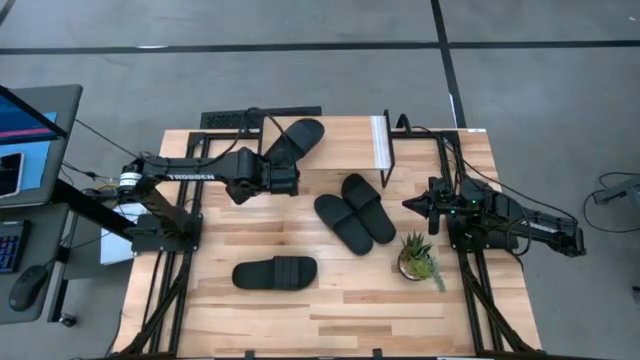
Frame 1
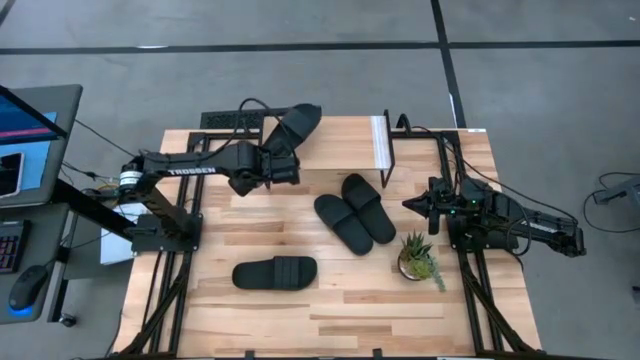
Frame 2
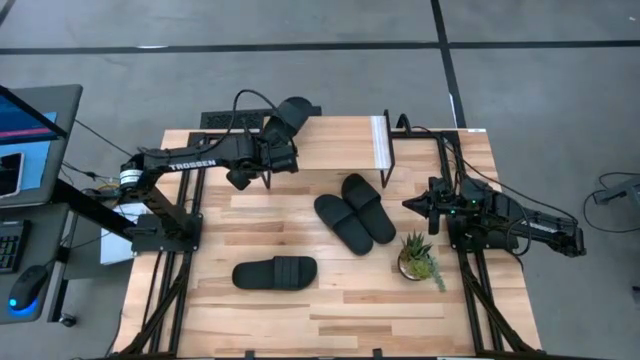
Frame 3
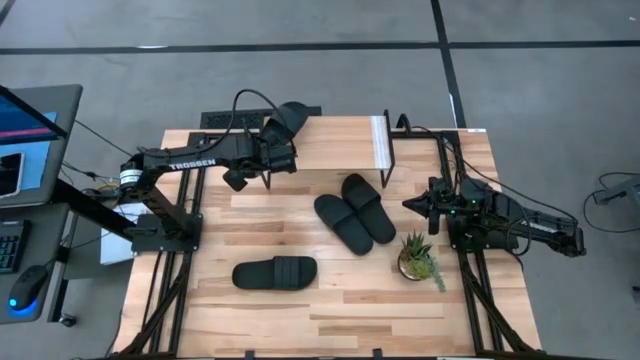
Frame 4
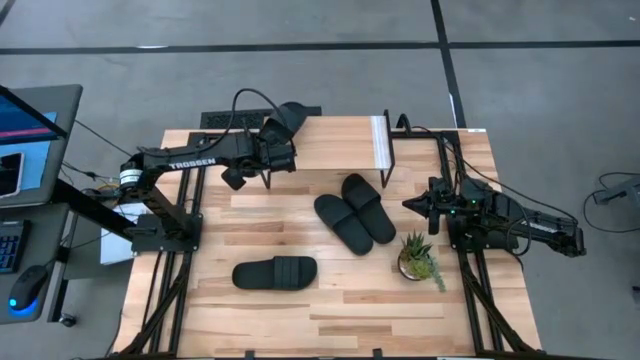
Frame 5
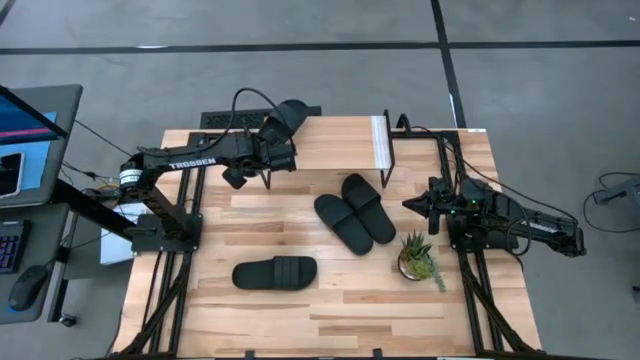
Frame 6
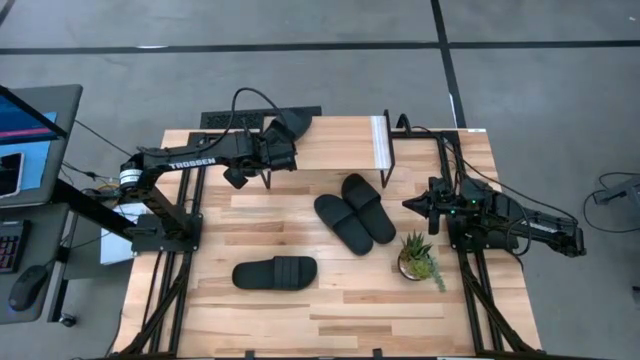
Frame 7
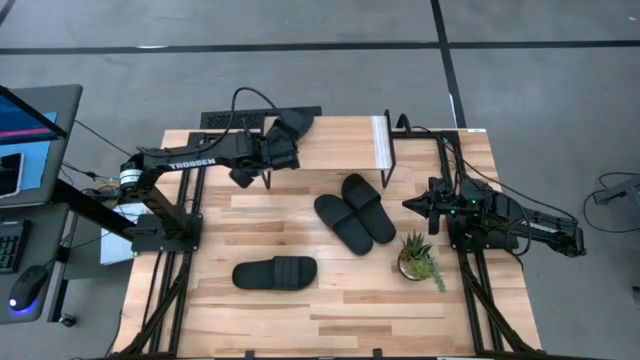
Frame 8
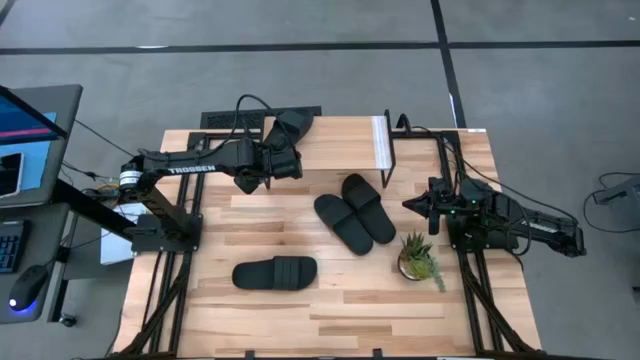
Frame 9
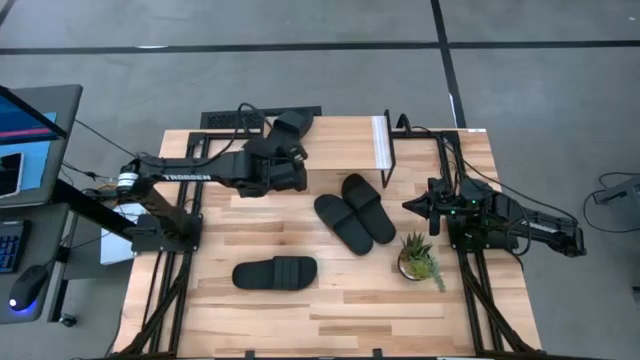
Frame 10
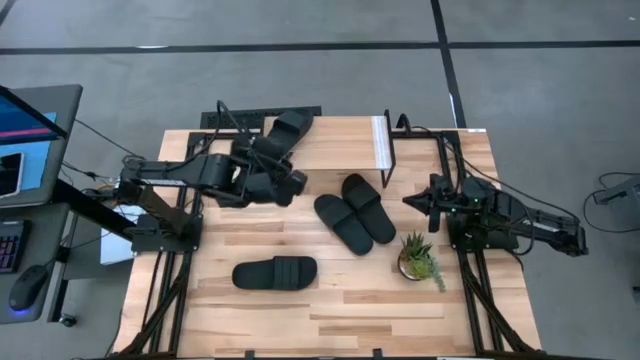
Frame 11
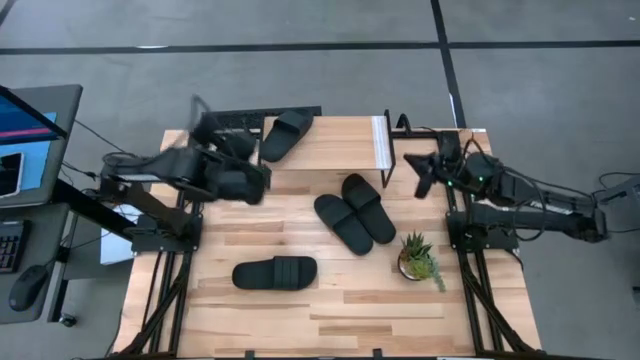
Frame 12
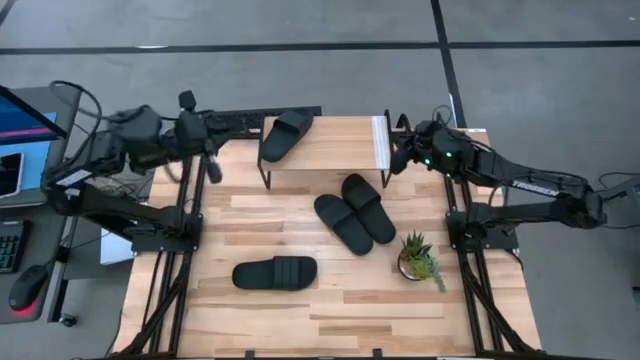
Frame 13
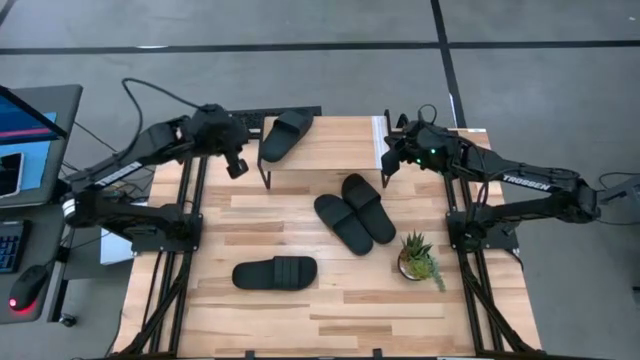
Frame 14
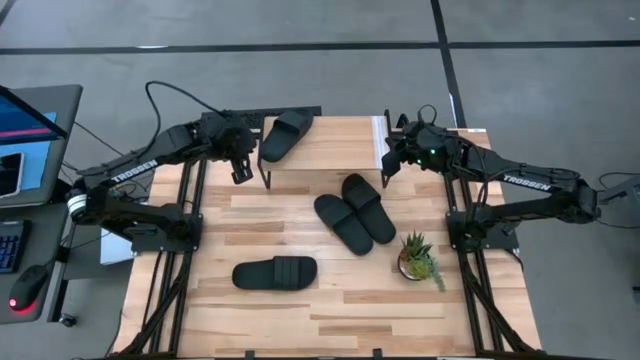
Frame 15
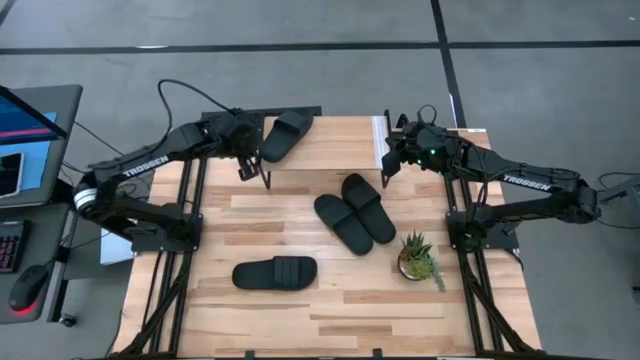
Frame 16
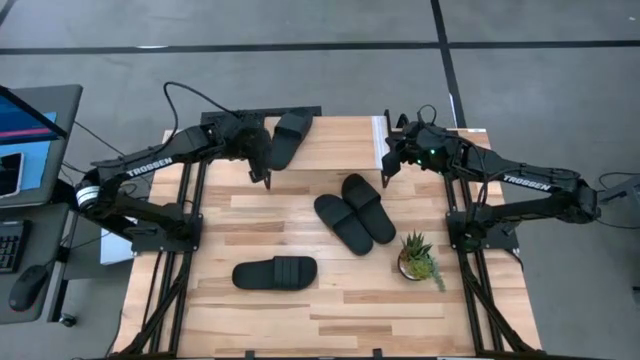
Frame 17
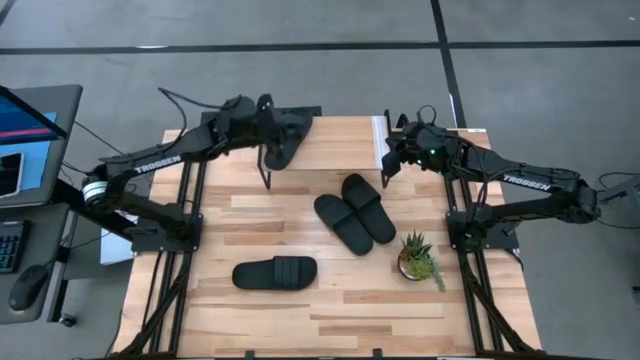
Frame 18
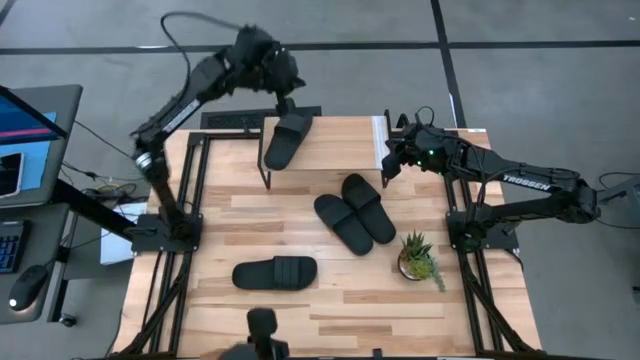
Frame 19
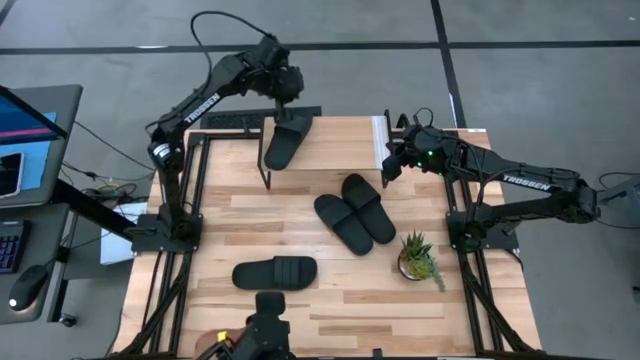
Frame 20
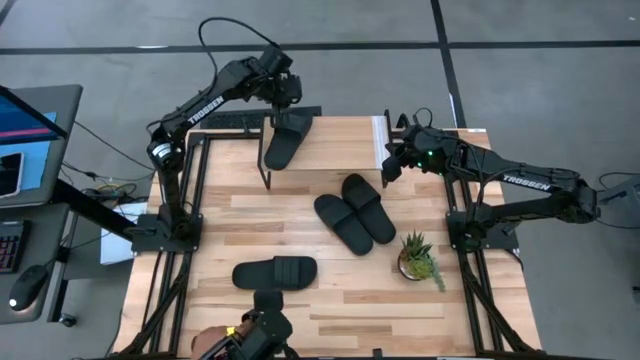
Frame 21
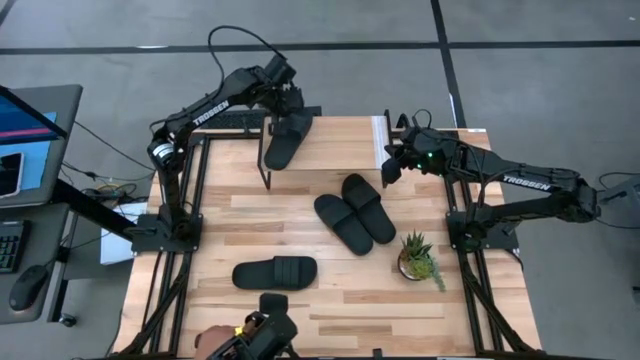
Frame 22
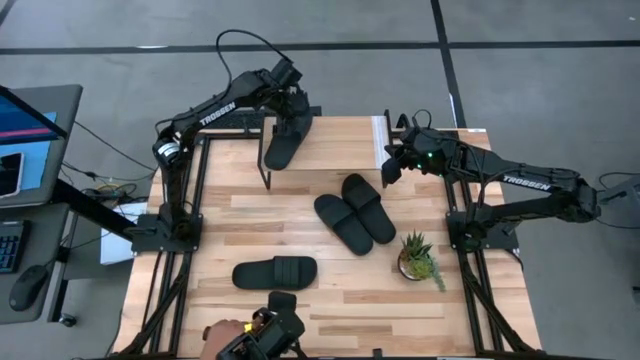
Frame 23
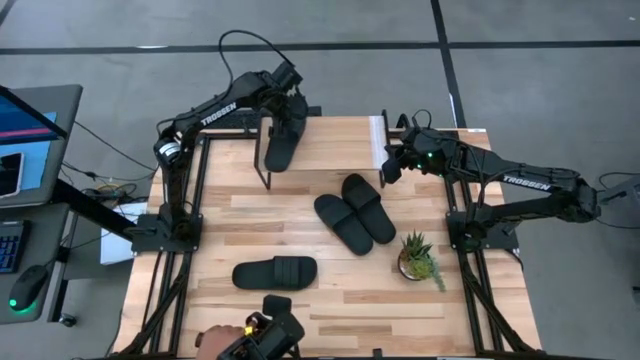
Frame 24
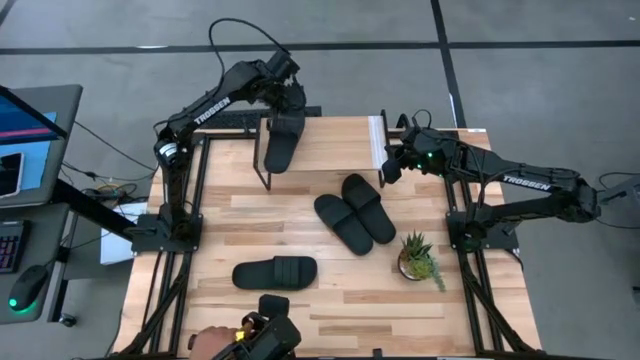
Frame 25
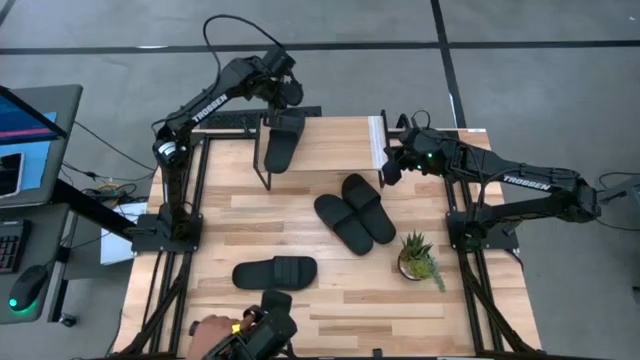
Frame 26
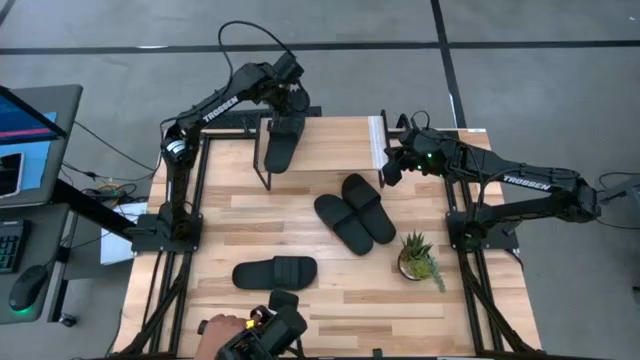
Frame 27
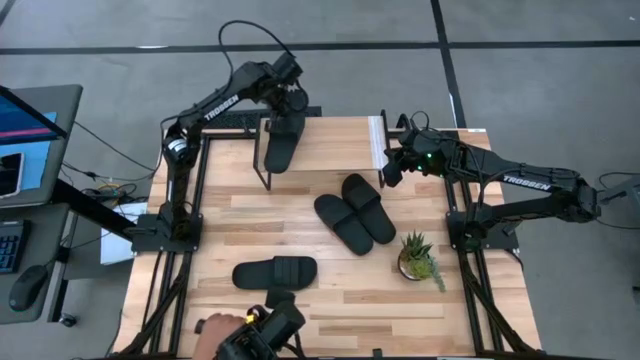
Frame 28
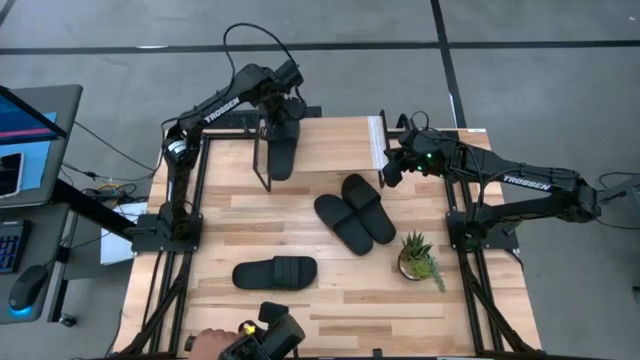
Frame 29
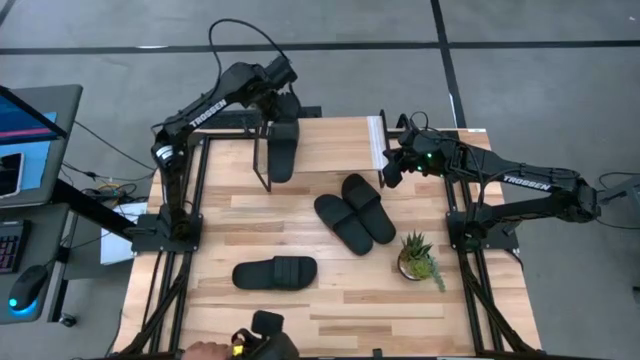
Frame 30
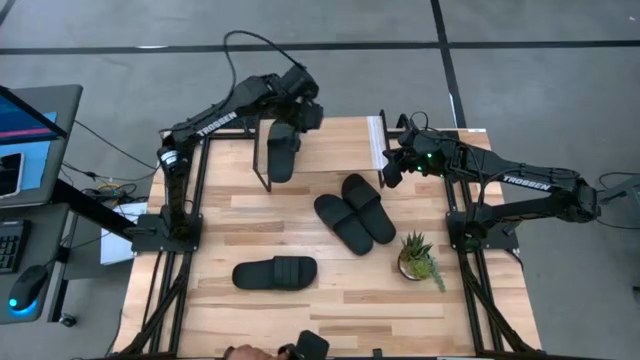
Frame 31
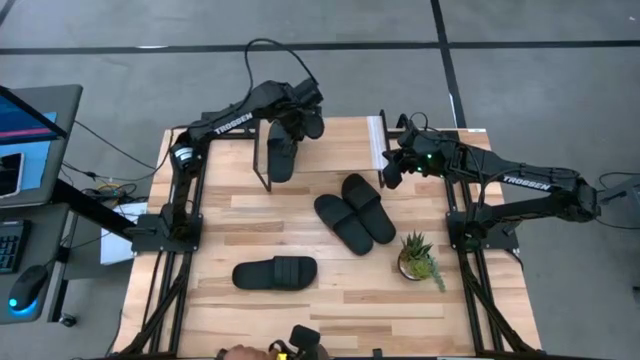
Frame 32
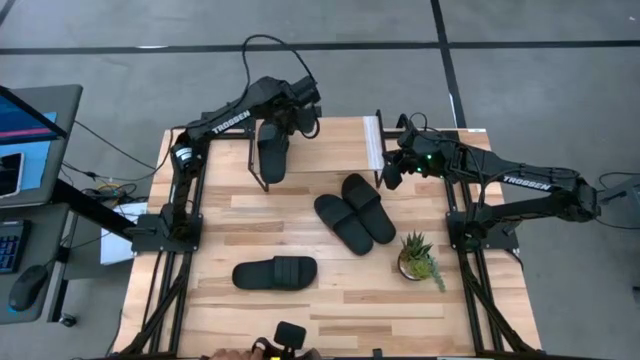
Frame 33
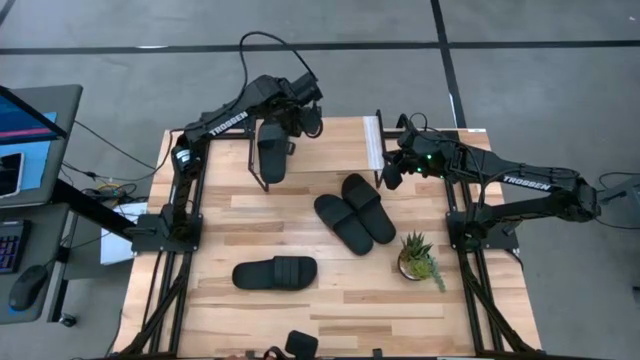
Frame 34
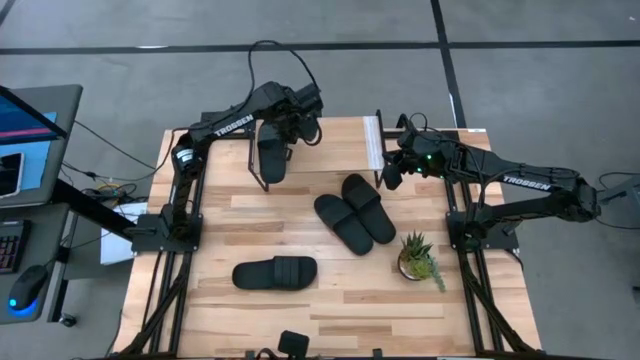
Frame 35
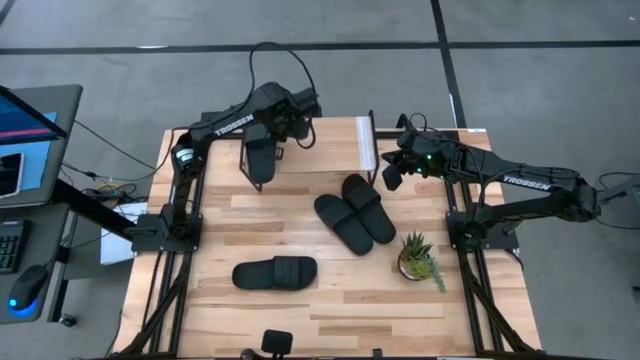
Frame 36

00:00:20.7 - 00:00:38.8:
Task: Pick and place slides into the shelf
Put the black slipper on the shelf

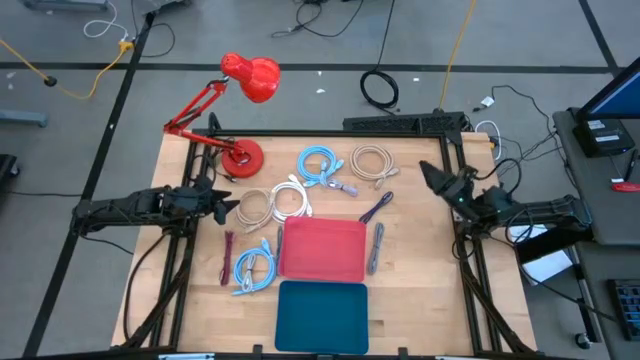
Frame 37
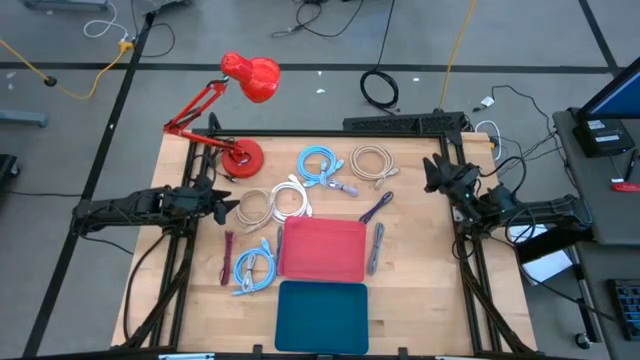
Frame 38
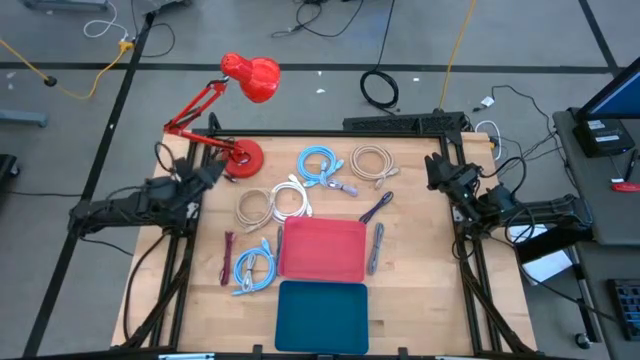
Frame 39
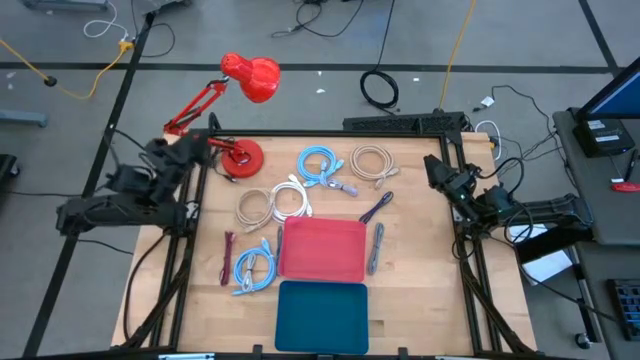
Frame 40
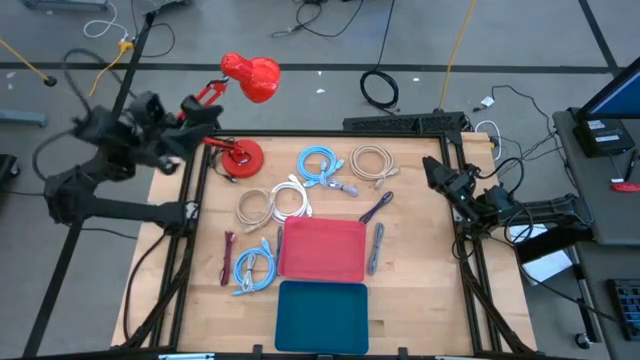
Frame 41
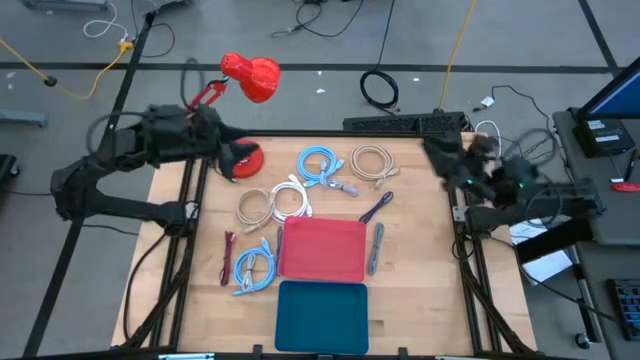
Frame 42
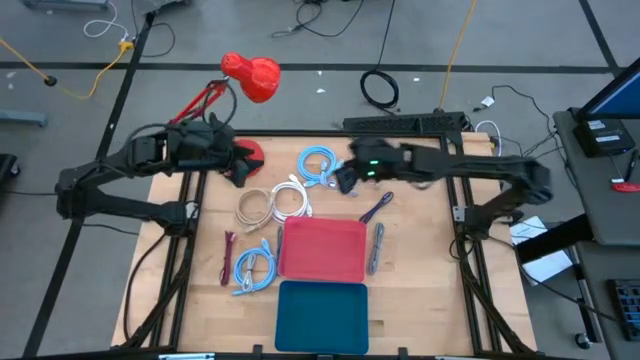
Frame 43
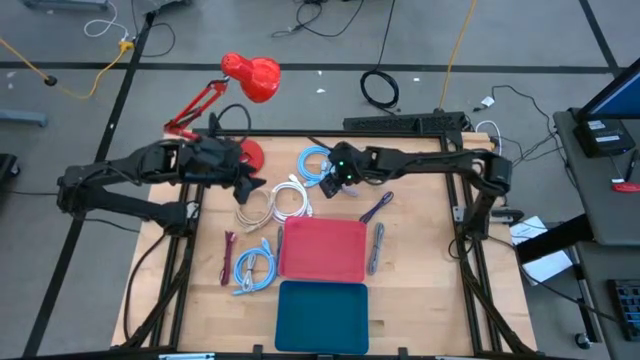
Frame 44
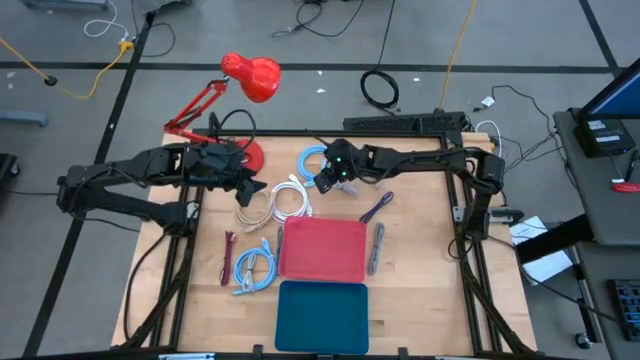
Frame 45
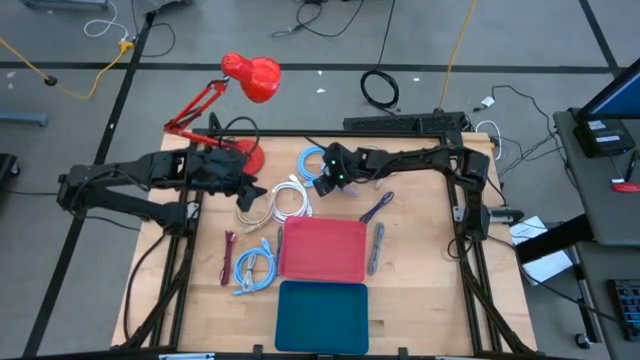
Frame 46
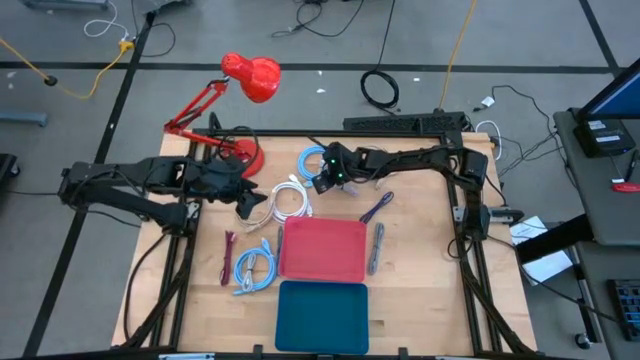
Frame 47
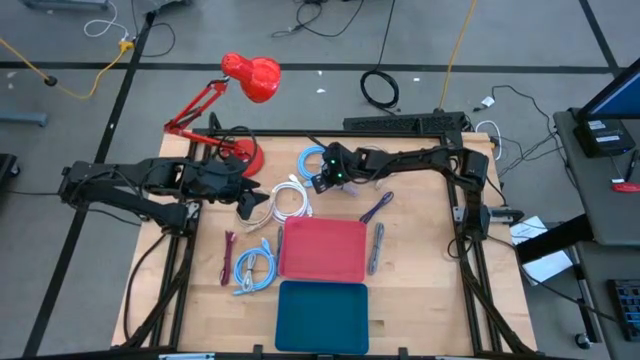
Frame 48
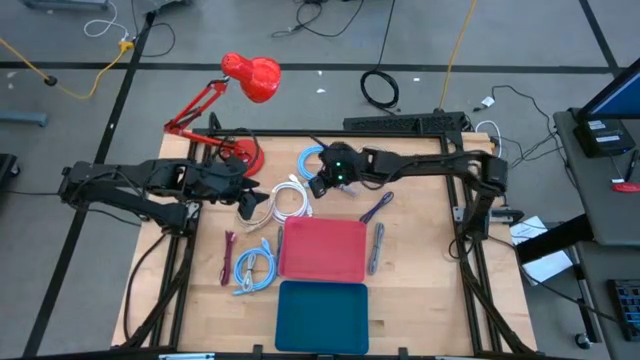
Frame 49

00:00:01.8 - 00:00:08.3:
Task: Pick & Place USB Port
Put the light blue charger cable into the blue bin
